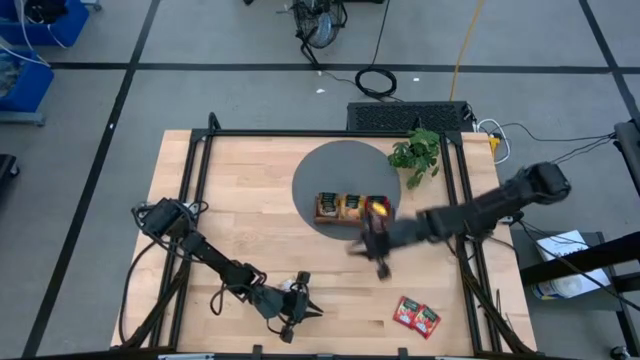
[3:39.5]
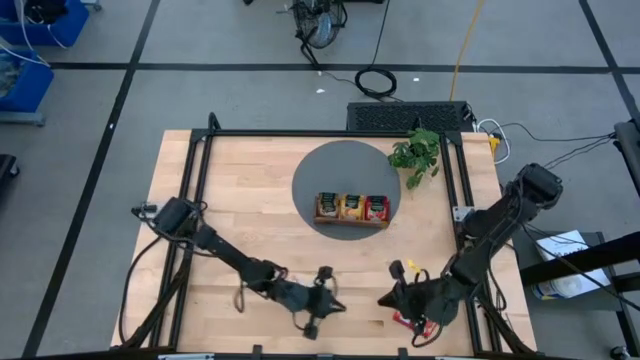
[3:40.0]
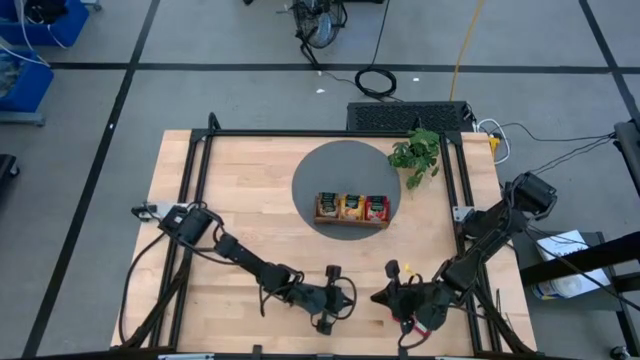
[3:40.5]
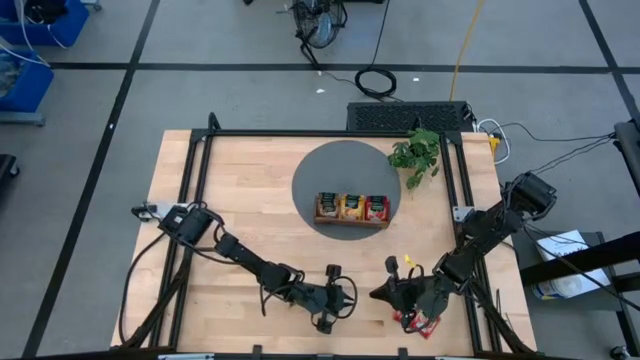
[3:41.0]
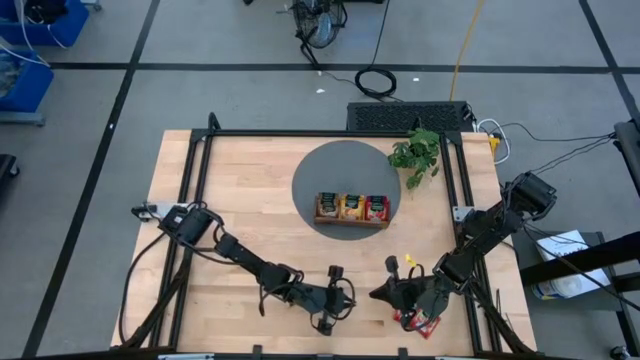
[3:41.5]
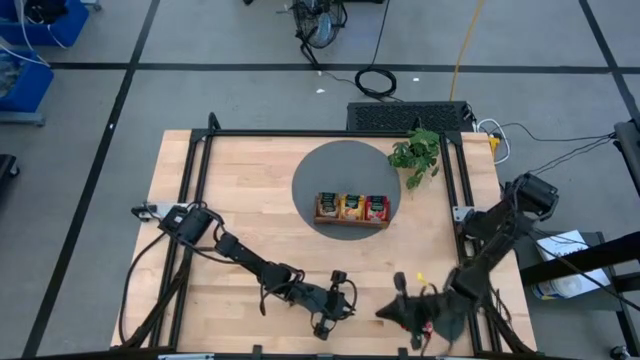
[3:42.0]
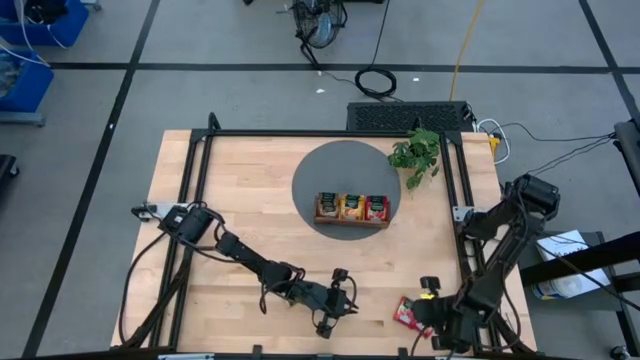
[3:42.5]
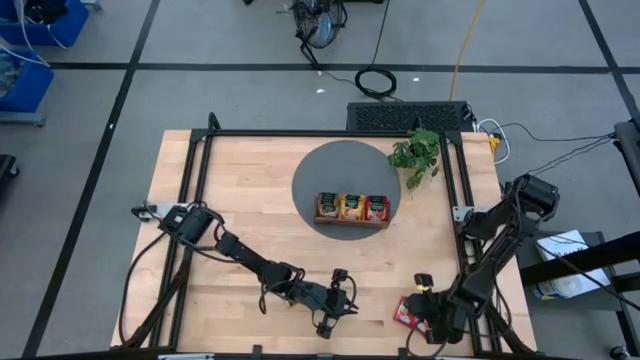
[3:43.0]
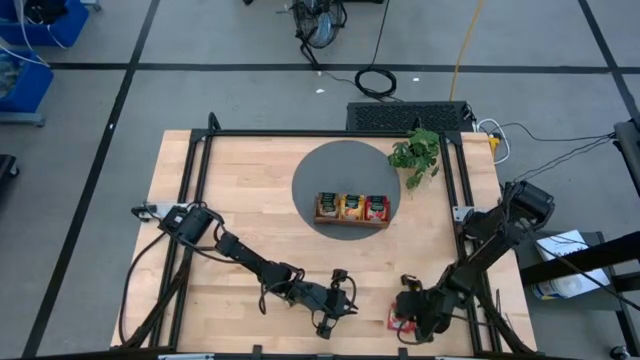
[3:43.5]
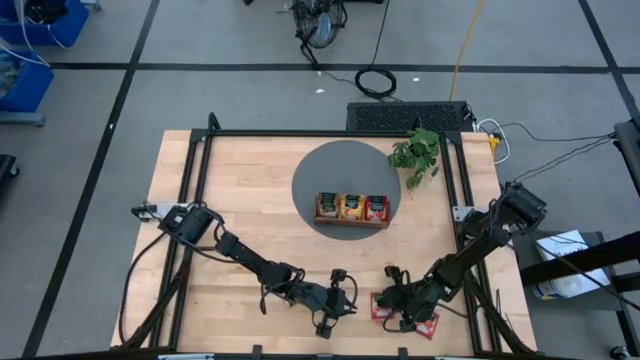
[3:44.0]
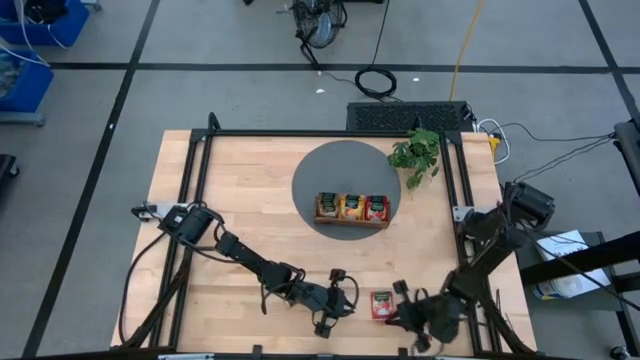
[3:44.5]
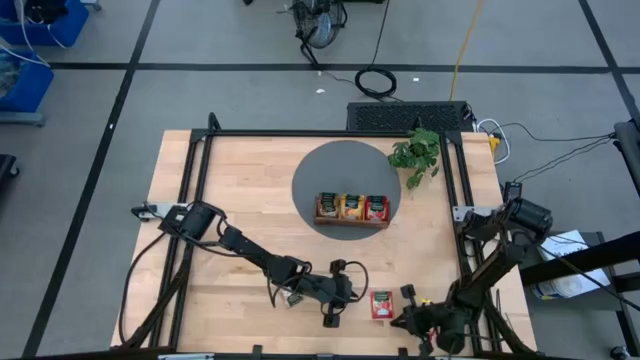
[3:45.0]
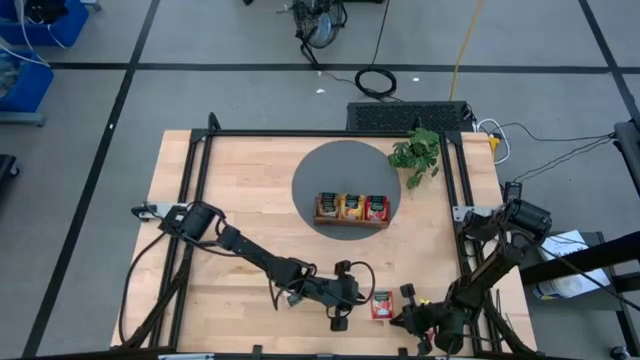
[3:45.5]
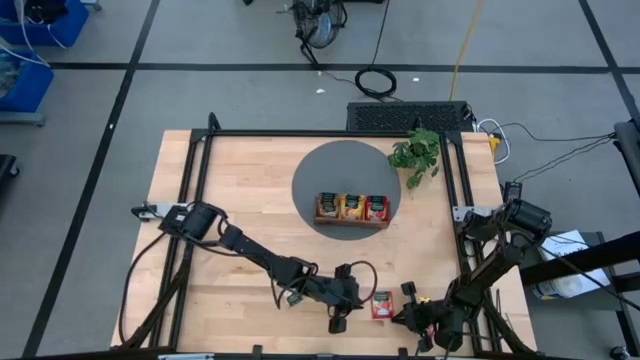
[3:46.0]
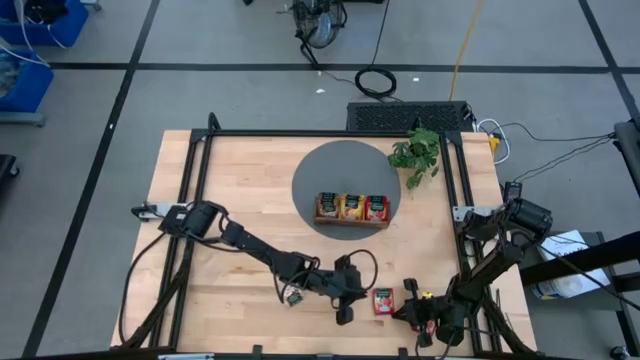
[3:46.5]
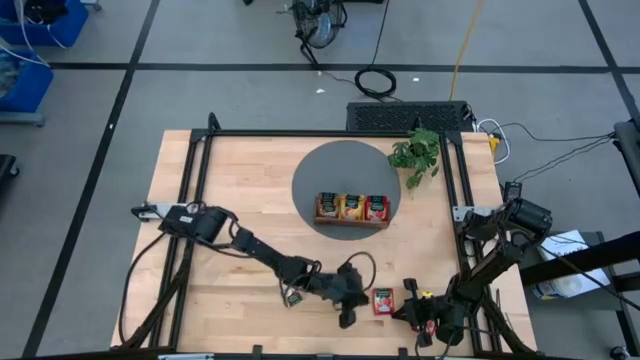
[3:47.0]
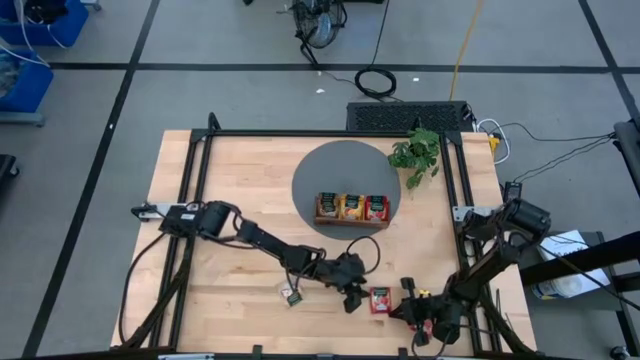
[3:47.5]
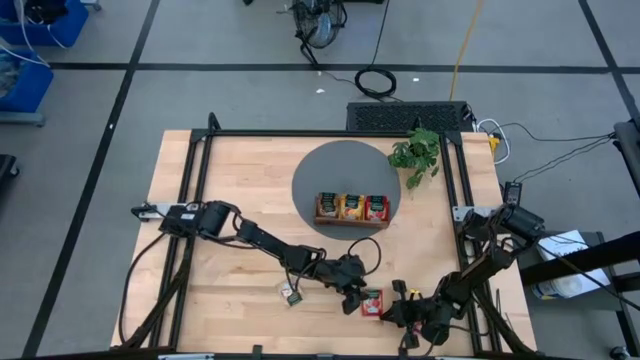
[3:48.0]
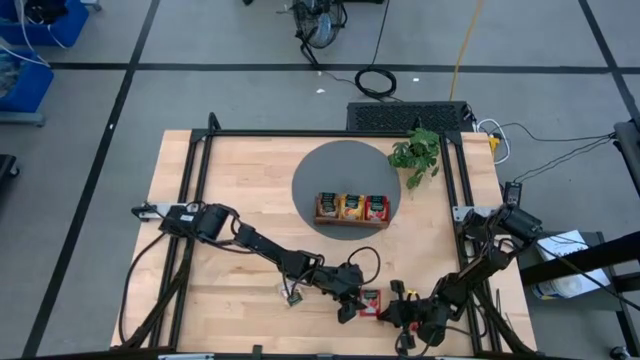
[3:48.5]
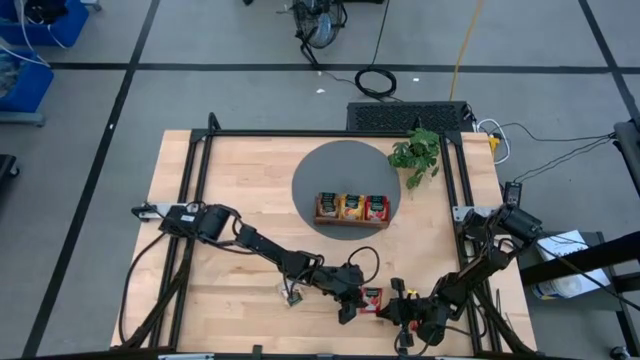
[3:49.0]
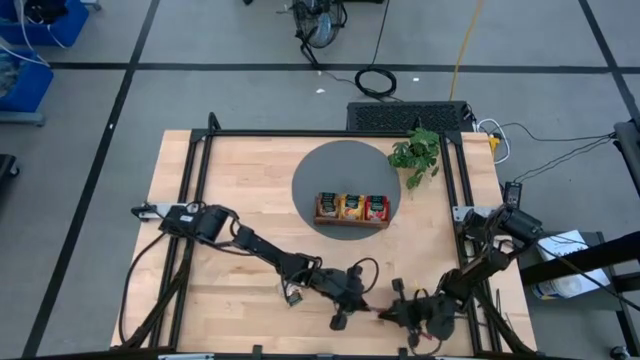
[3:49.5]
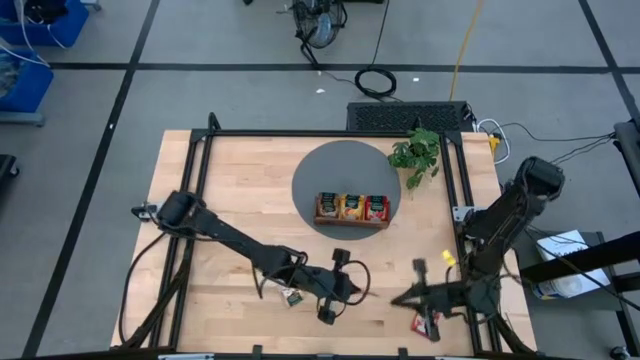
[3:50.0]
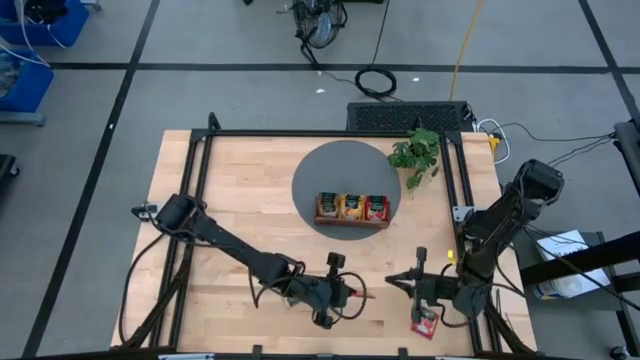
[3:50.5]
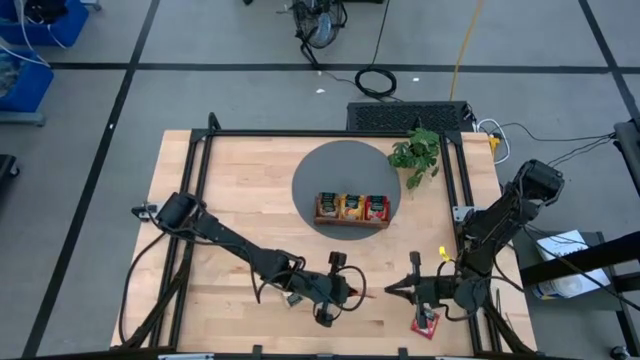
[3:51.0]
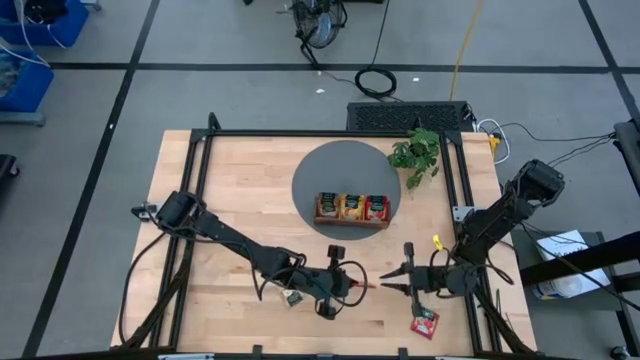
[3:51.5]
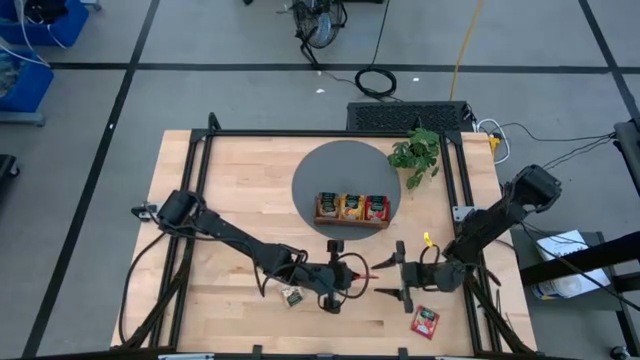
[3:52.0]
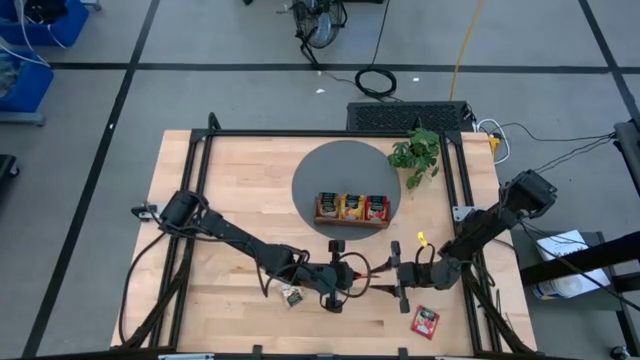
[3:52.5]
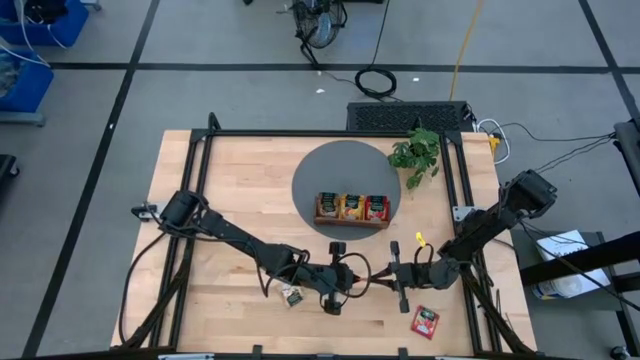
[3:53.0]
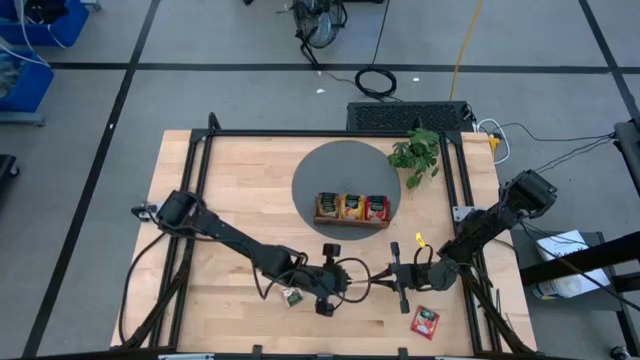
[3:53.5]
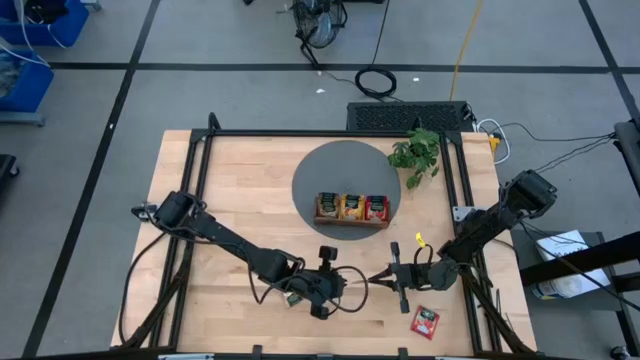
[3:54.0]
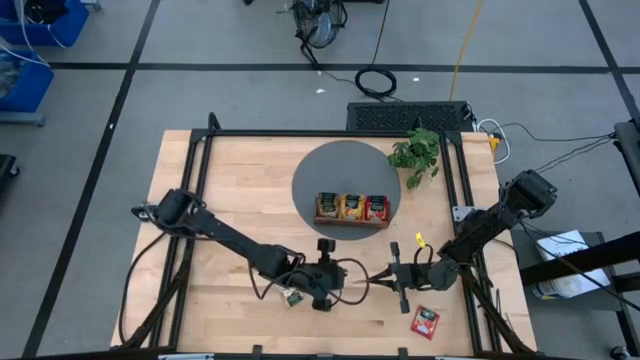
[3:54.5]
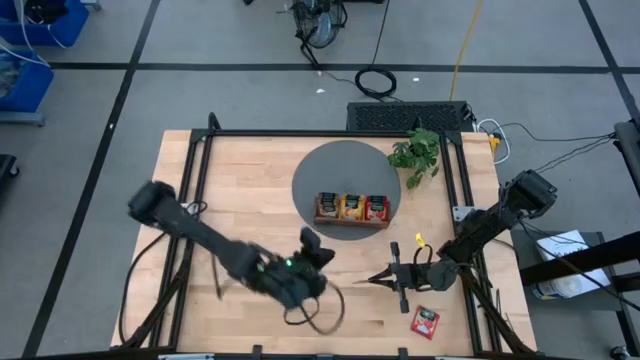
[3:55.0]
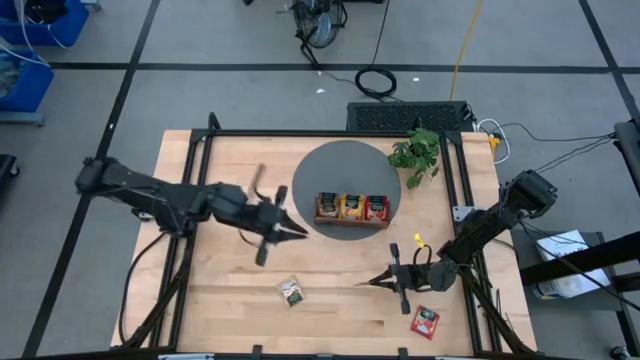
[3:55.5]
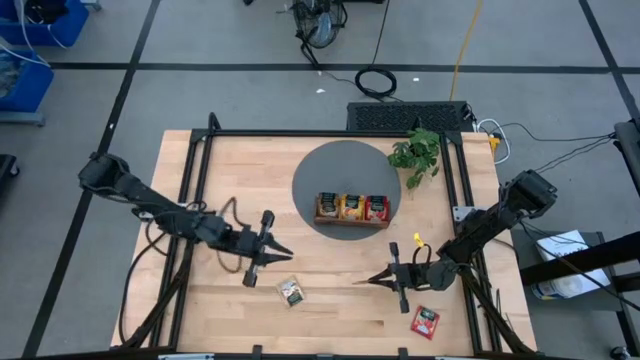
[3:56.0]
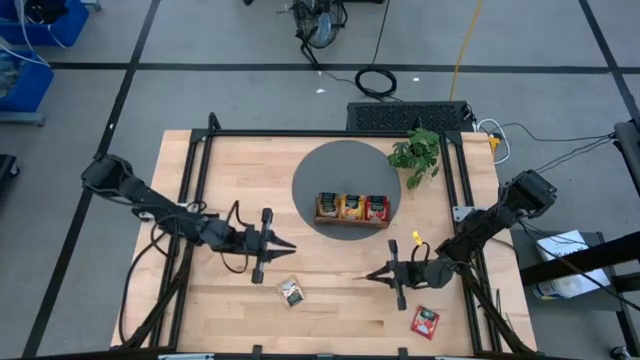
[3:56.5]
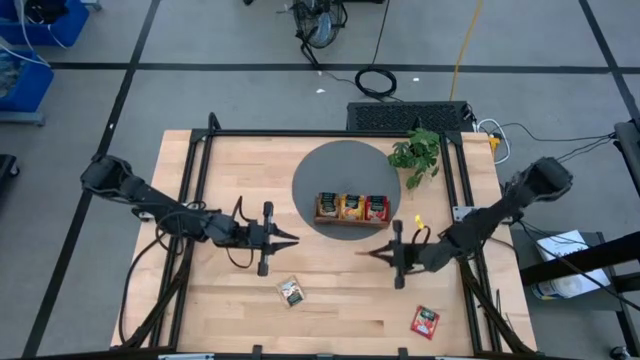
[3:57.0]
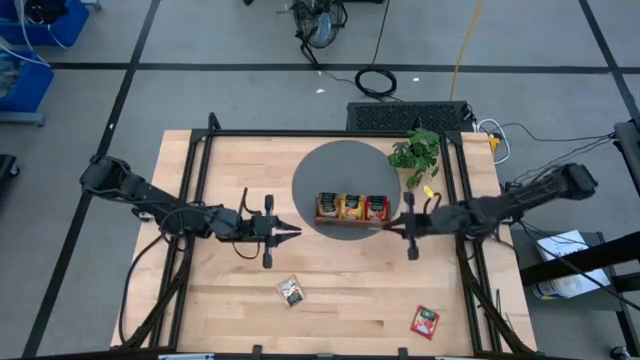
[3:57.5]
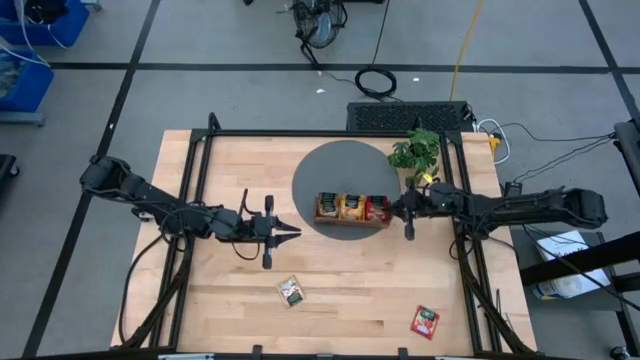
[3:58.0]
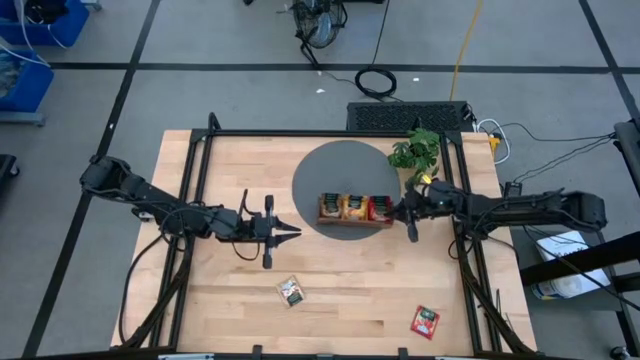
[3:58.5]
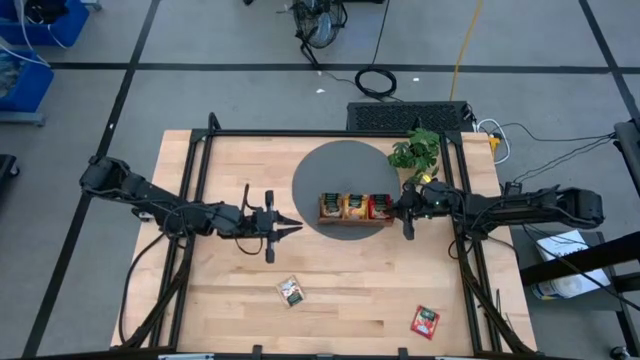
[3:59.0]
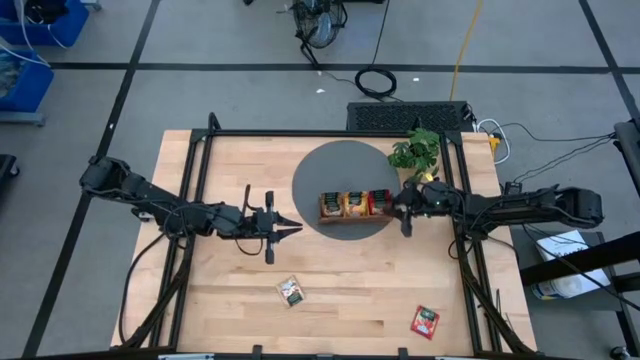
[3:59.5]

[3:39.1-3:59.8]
Task: Pick & Place Tea
Put the red tea bag into the right section of the wooden organiser

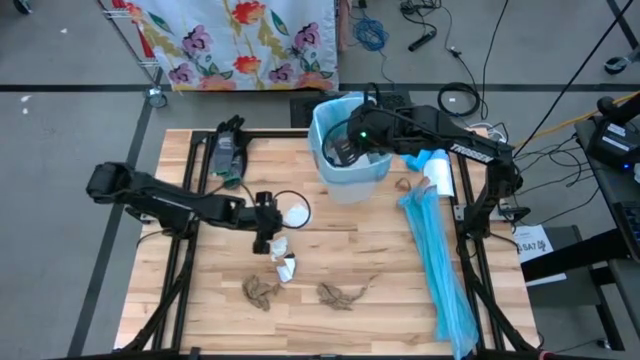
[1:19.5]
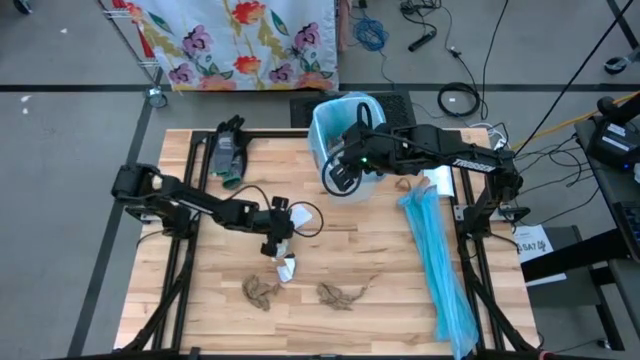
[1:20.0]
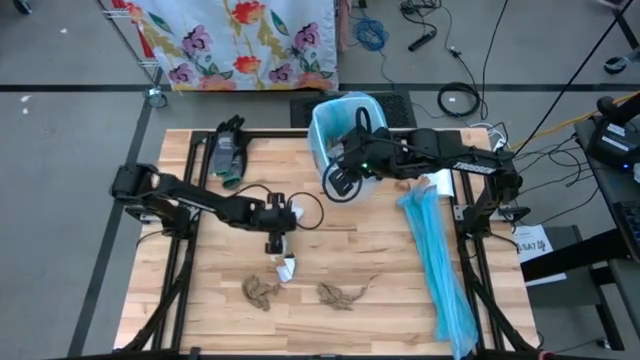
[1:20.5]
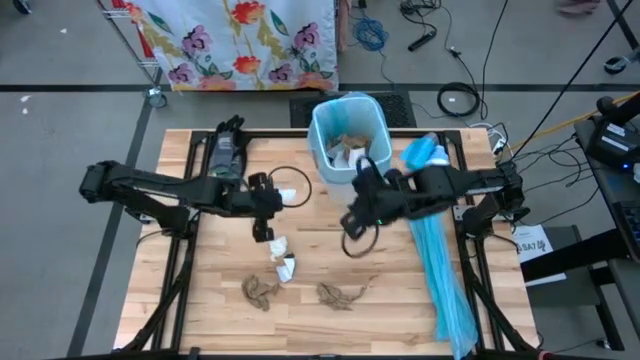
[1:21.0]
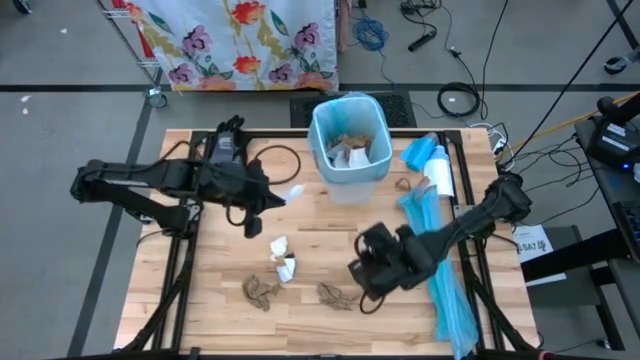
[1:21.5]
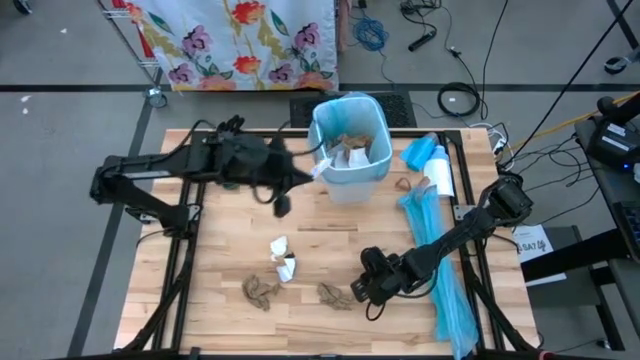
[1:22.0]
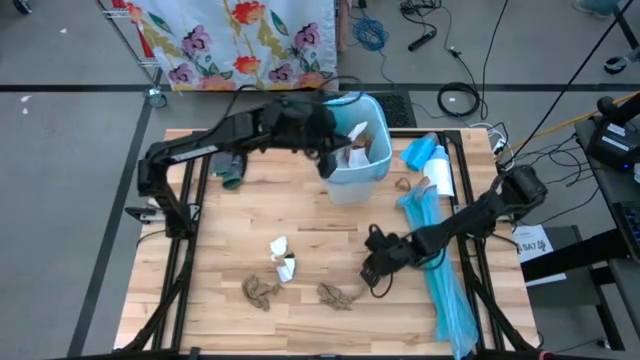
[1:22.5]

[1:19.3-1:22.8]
Task: place trash/remove bag and relplace
Put the piece of magazine into the trash bin
